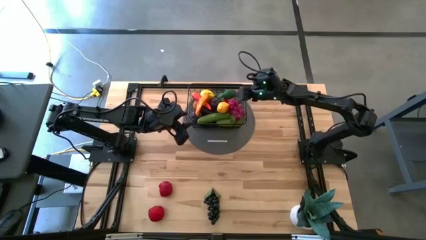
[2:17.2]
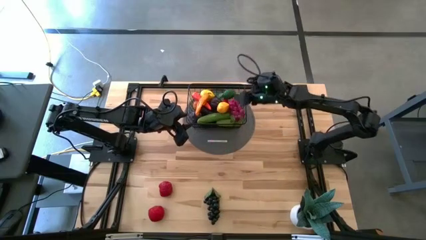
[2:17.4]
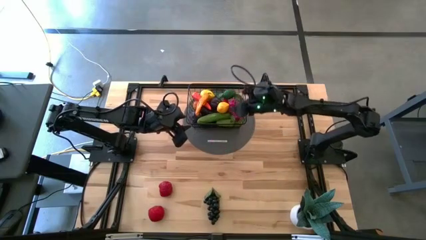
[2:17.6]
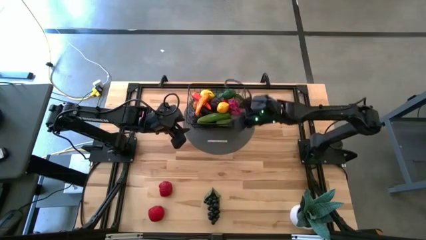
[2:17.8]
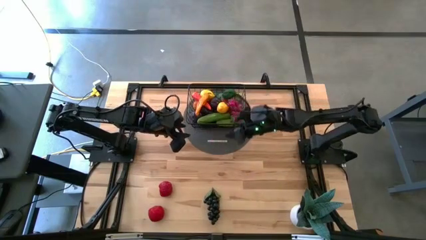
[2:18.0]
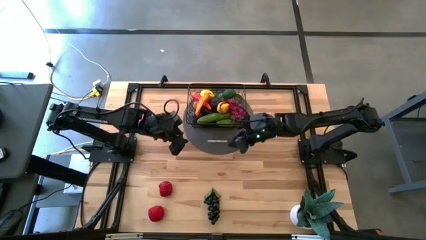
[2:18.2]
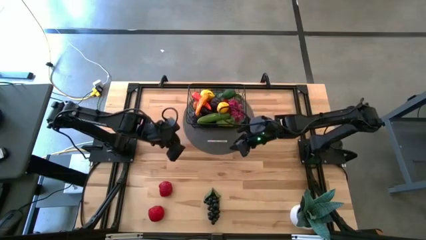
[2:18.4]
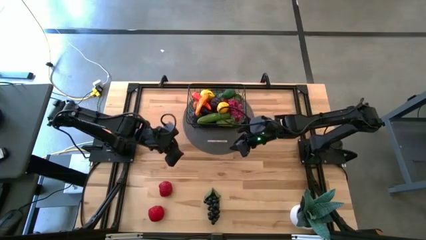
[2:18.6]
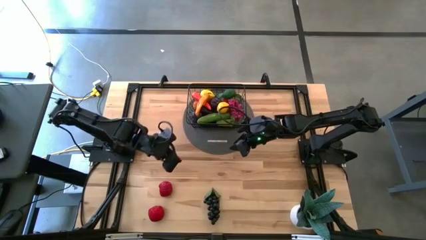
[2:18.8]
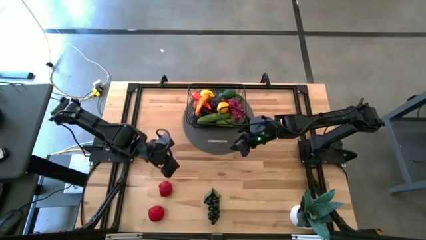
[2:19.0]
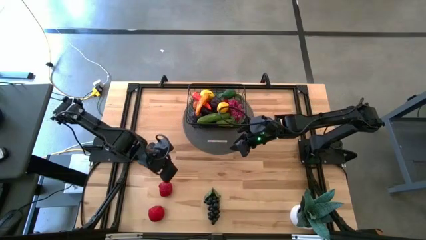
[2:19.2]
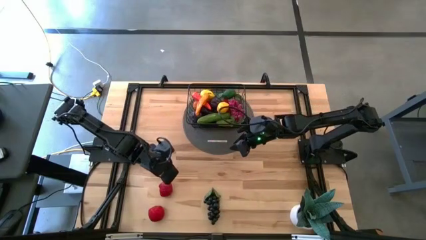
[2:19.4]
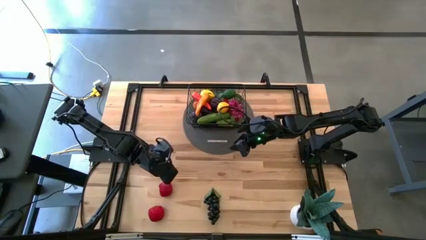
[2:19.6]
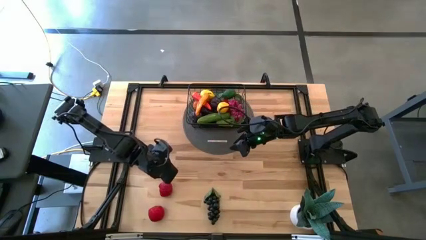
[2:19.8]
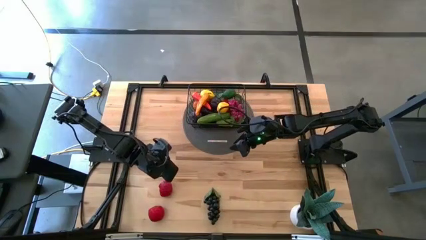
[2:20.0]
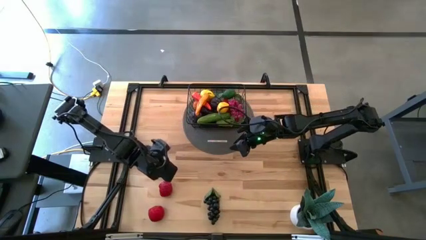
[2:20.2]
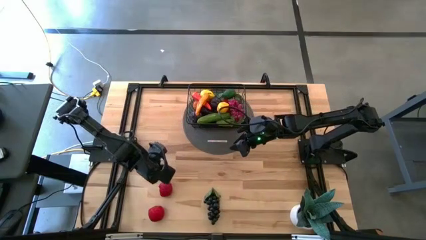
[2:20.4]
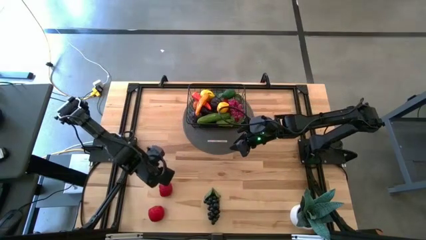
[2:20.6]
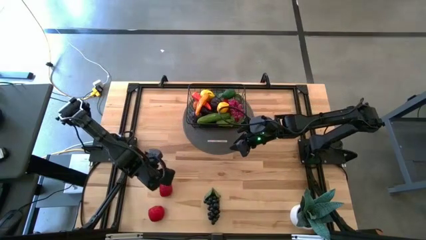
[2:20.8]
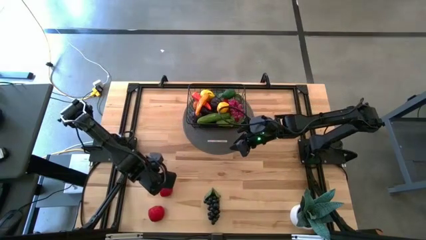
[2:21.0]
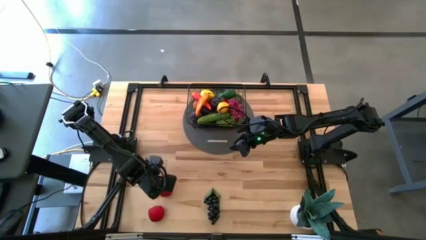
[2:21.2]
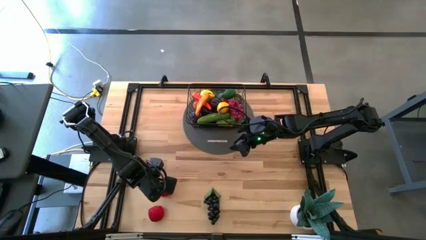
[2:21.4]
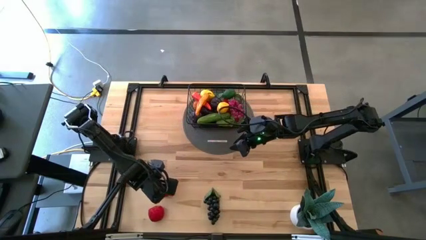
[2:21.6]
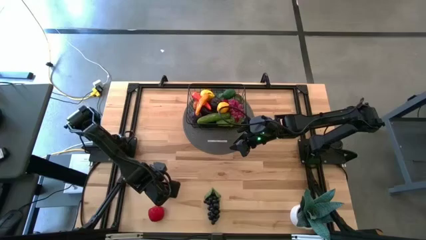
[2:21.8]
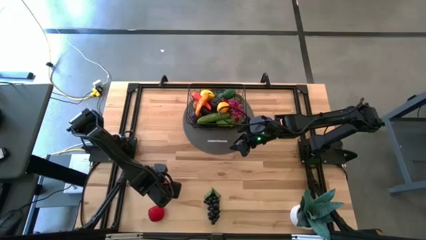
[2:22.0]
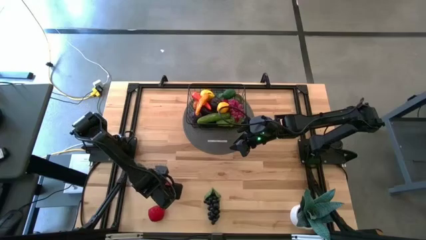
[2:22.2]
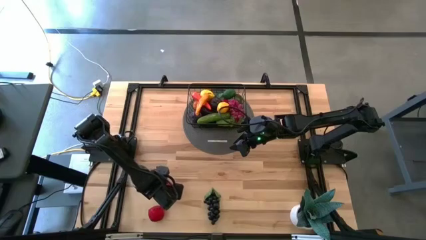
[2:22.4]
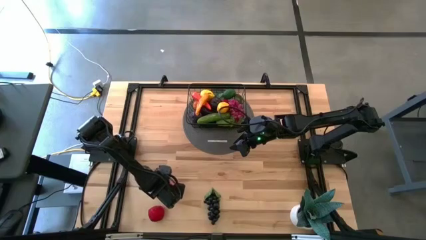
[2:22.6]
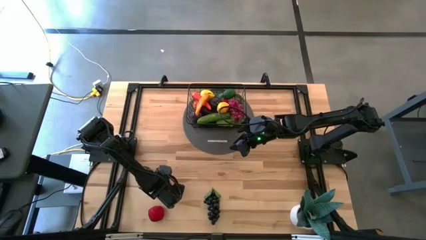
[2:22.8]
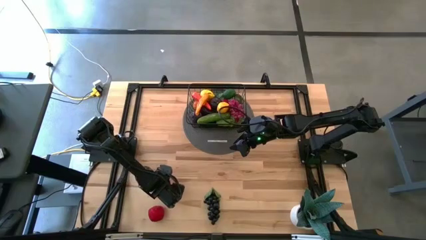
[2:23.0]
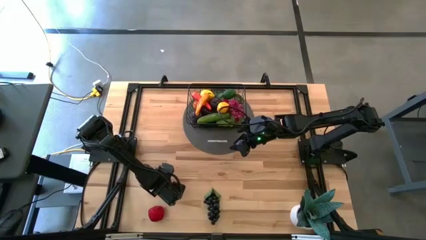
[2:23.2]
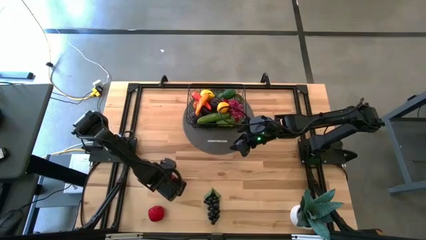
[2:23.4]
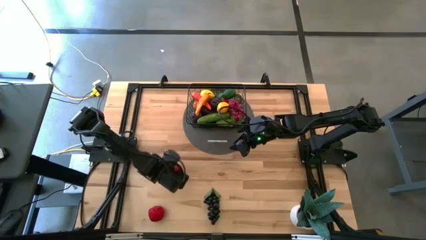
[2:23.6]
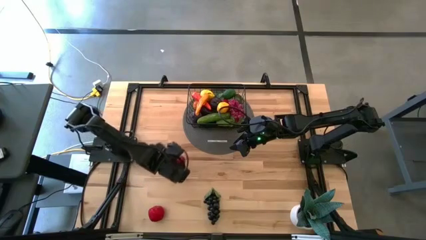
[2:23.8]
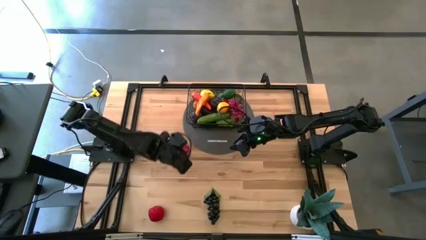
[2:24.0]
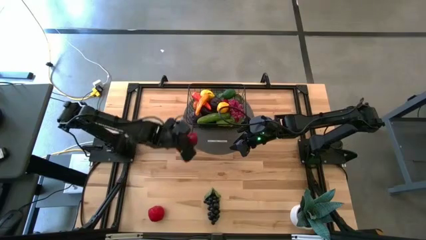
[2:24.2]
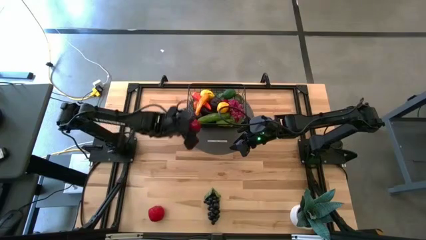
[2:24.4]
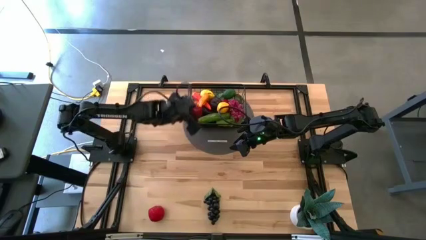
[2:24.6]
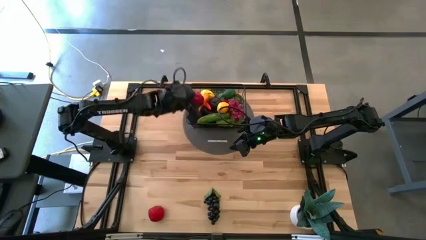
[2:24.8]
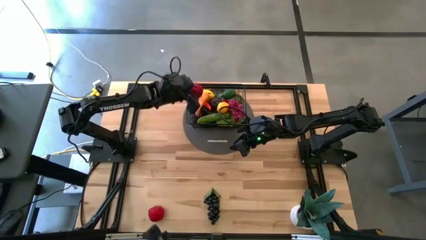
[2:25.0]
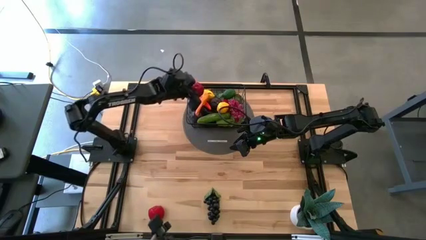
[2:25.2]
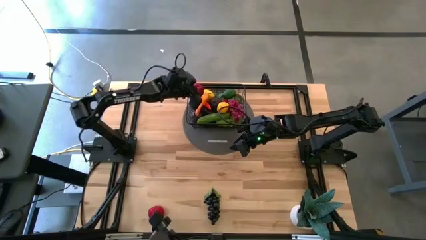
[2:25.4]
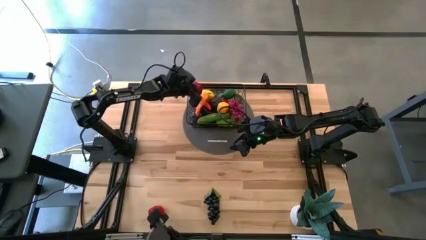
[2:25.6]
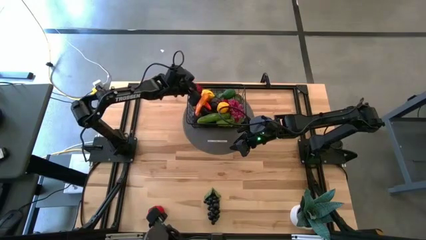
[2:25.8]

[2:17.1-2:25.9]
Task: Build produce basket
Put the top red tomato into the black wire basket

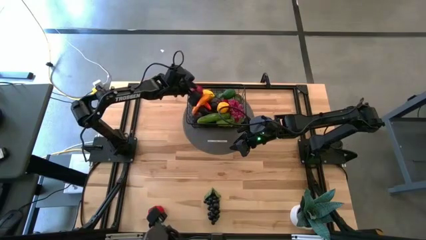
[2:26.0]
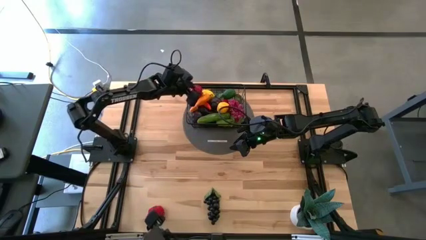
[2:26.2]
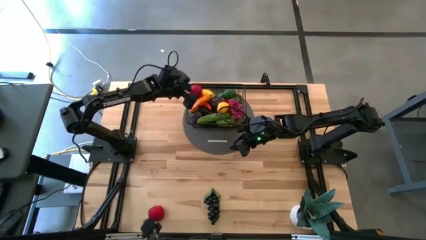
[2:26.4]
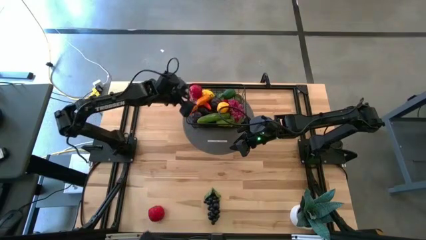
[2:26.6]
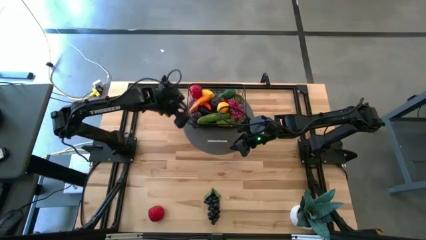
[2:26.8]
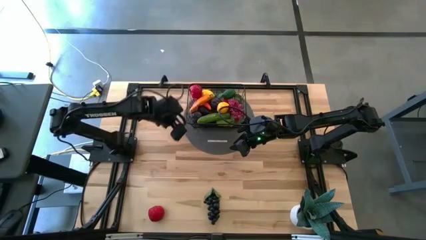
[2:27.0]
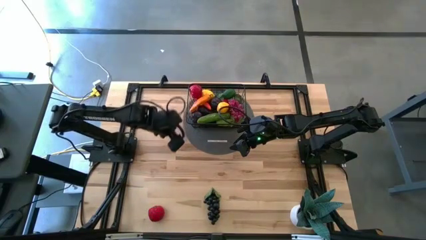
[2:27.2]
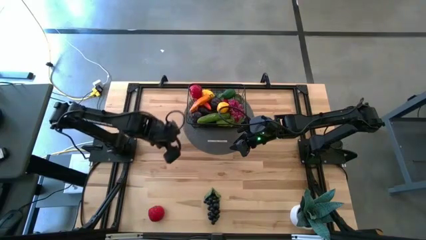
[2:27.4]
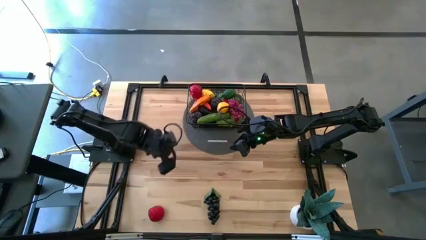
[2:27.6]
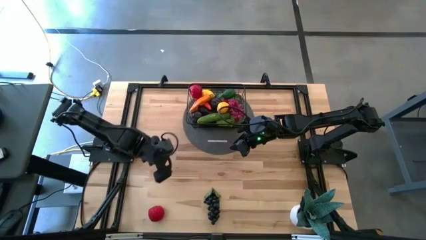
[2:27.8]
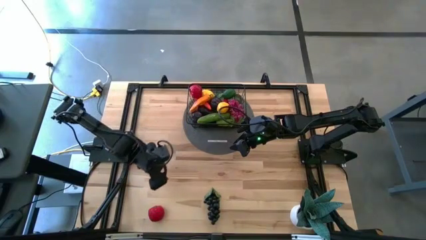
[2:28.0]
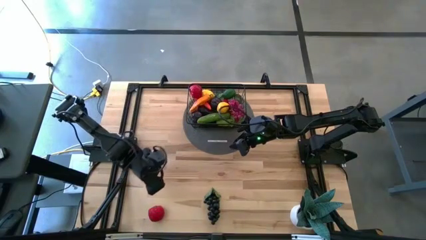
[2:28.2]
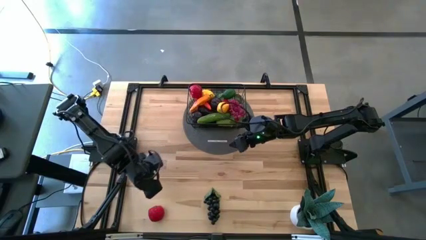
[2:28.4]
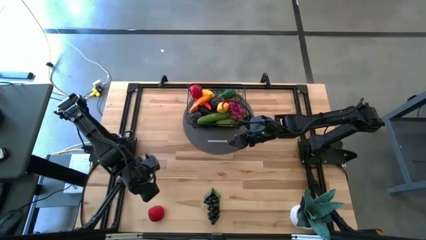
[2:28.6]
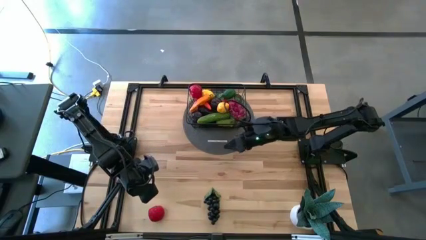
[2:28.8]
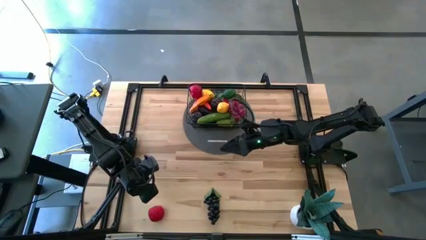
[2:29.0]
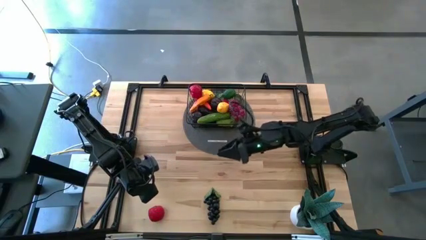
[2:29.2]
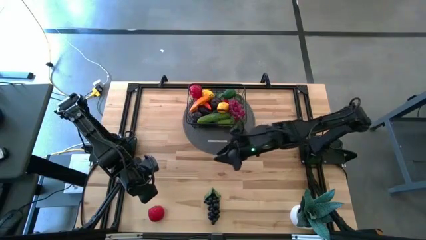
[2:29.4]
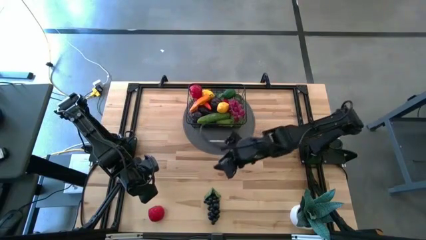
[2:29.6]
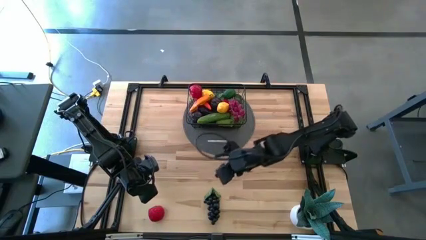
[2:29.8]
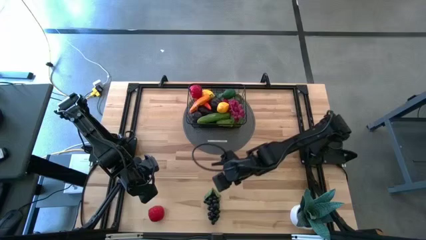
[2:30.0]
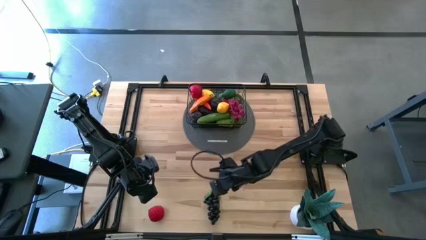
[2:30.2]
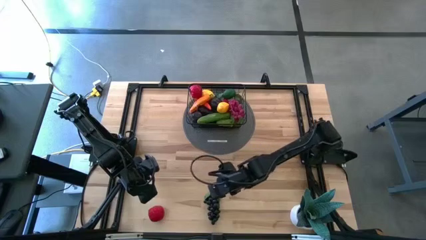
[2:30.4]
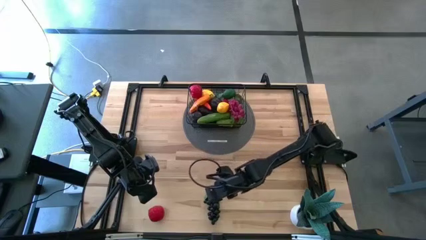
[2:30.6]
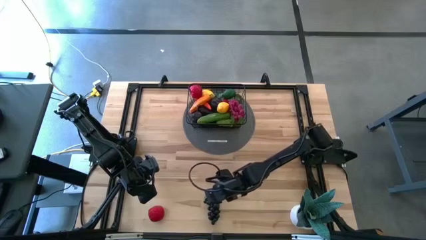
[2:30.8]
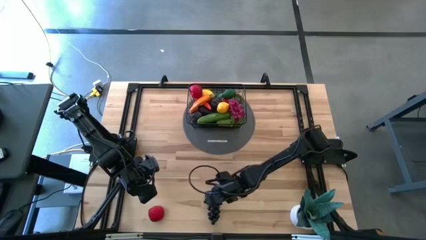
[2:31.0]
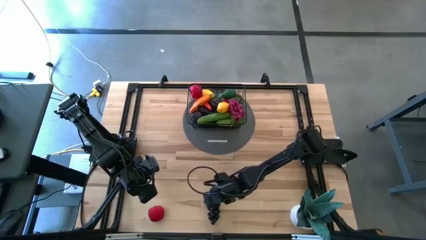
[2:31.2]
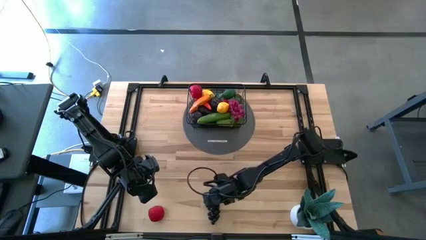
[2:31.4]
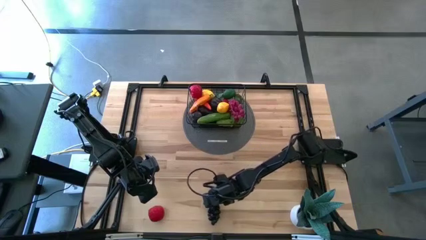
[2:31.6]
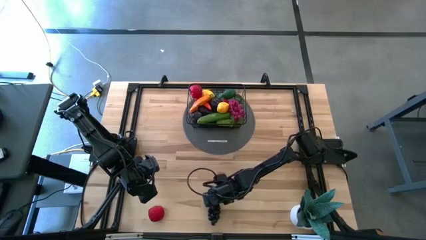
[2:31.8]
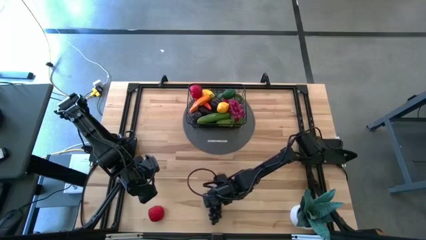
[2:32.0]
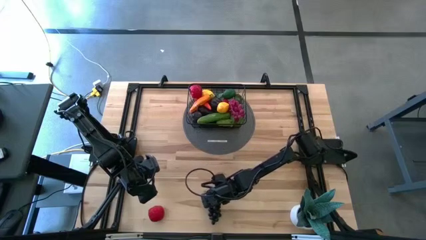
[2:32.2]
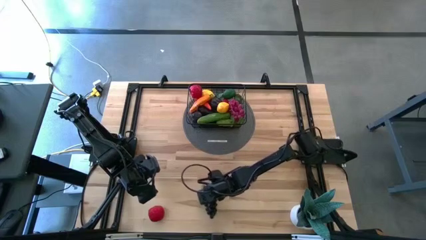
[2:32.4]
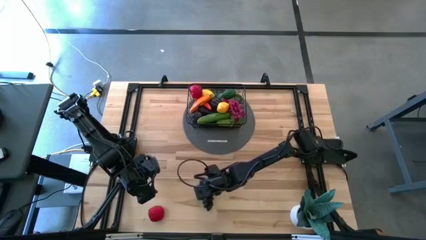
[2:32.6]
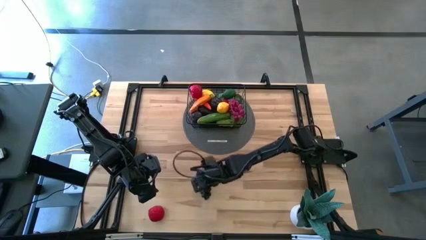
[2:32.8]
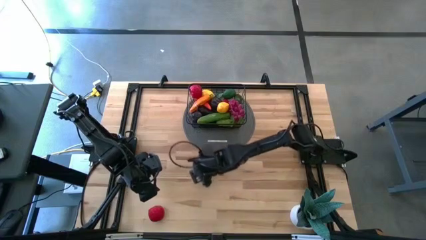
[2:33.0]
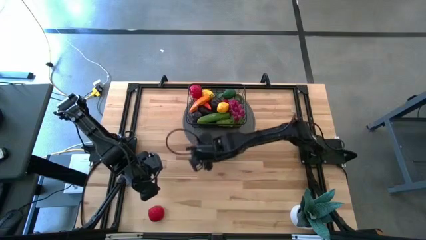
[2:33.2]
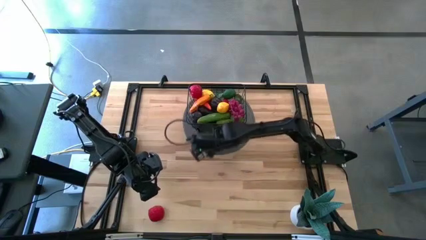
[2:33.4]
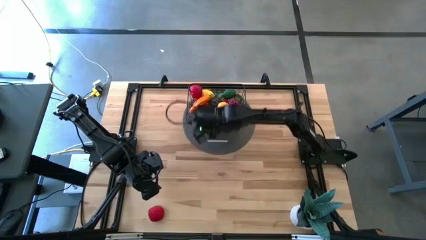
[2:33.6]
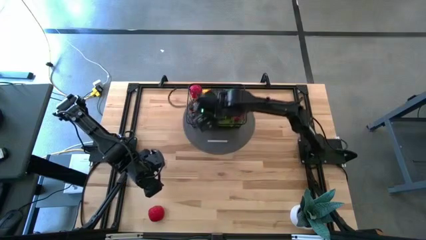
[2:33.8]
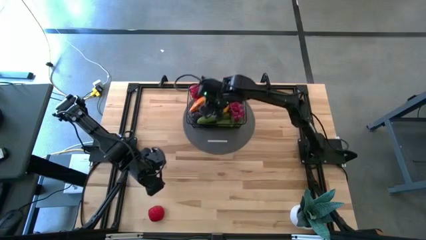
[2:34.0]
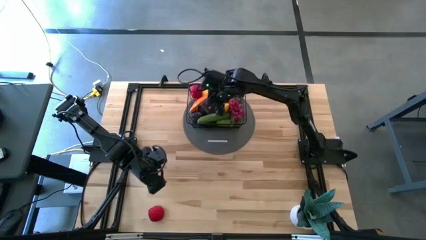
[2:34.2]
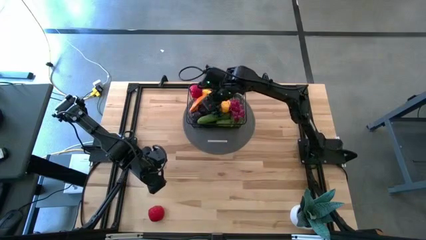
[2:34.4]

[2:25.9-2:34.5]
Put the black grapes into the black wire basket
